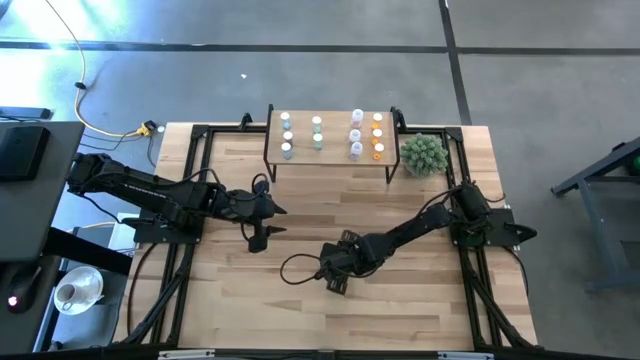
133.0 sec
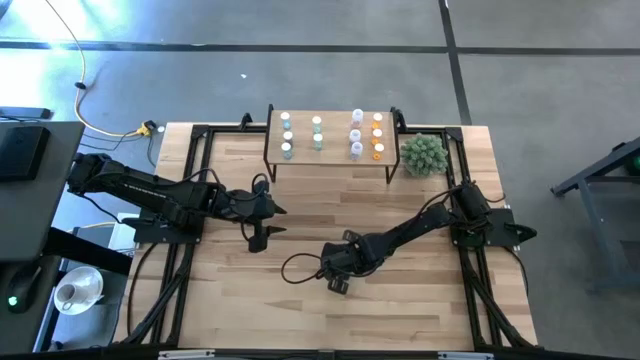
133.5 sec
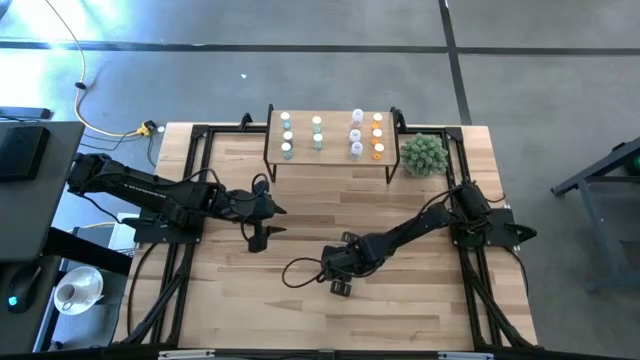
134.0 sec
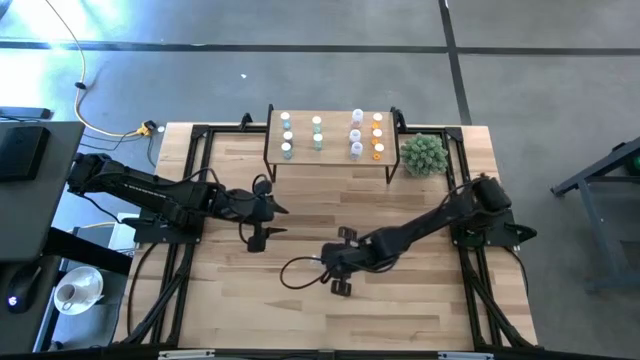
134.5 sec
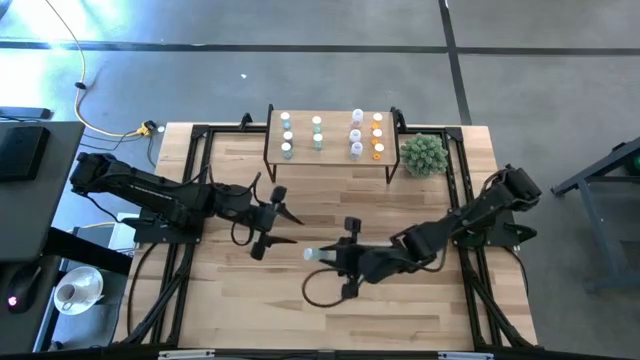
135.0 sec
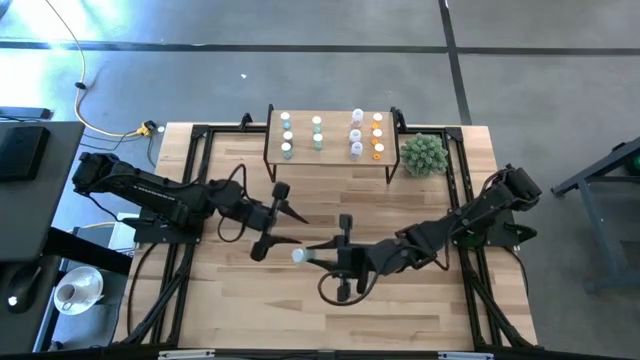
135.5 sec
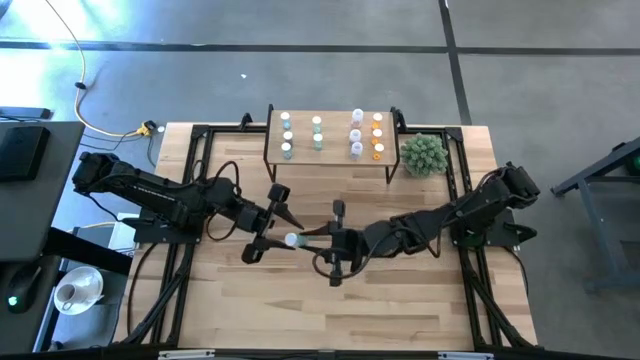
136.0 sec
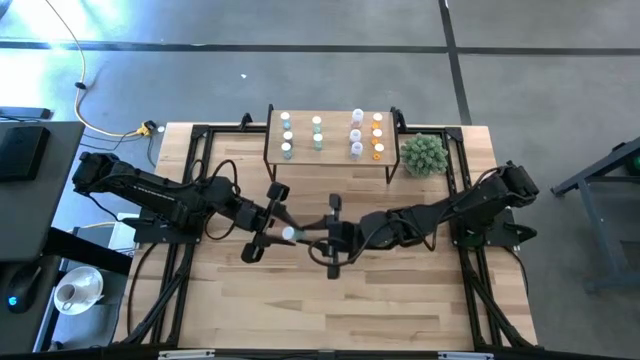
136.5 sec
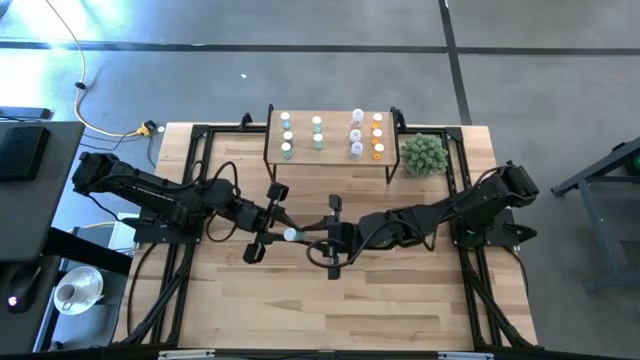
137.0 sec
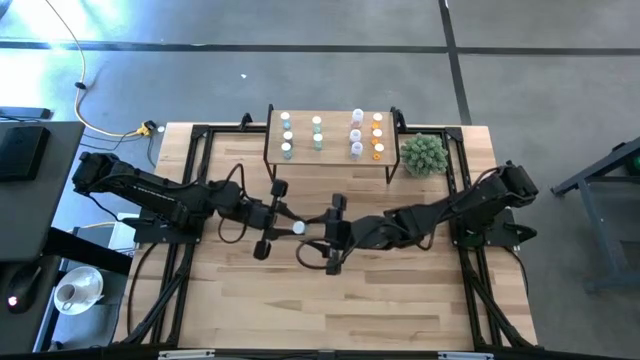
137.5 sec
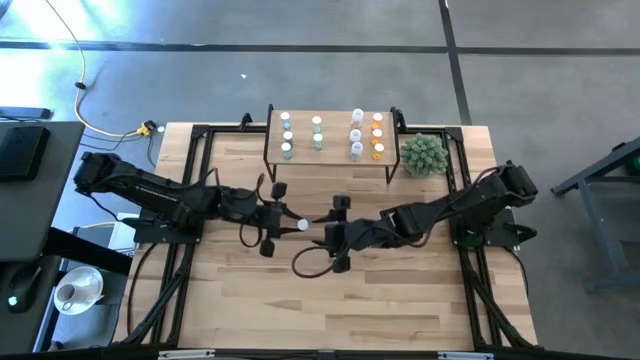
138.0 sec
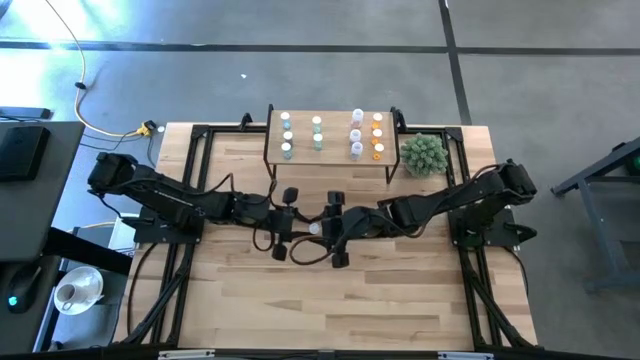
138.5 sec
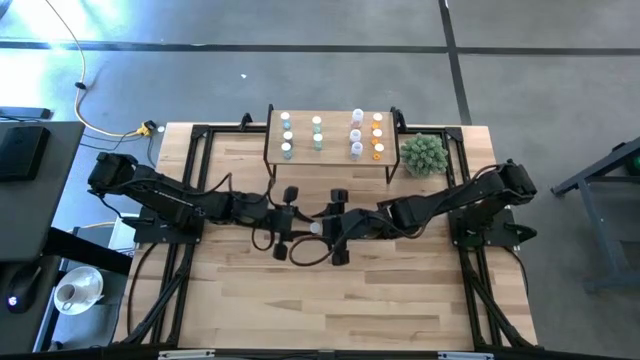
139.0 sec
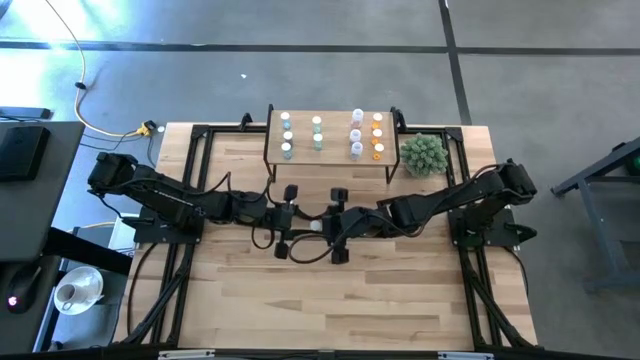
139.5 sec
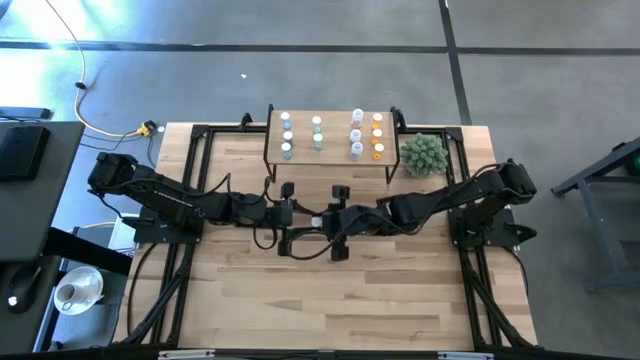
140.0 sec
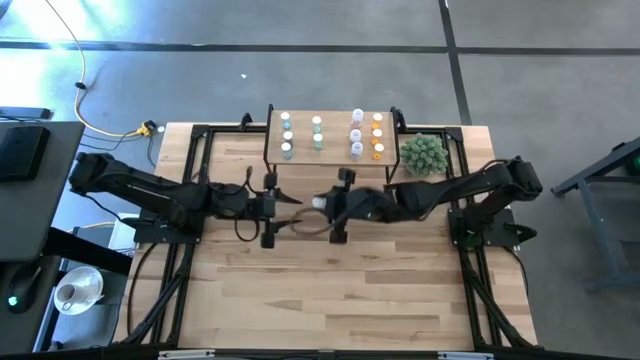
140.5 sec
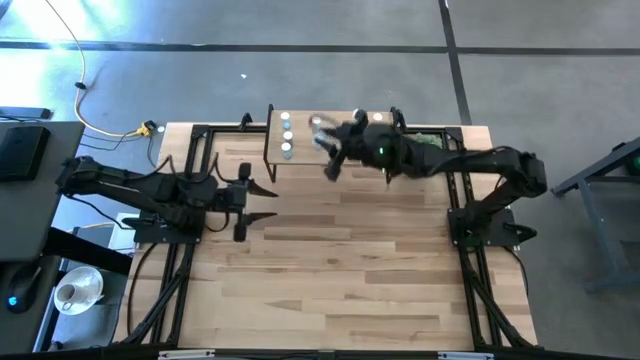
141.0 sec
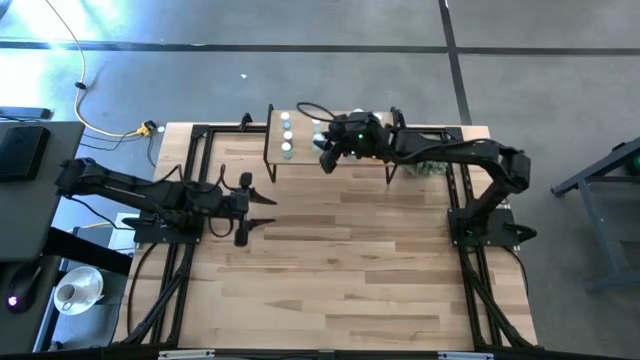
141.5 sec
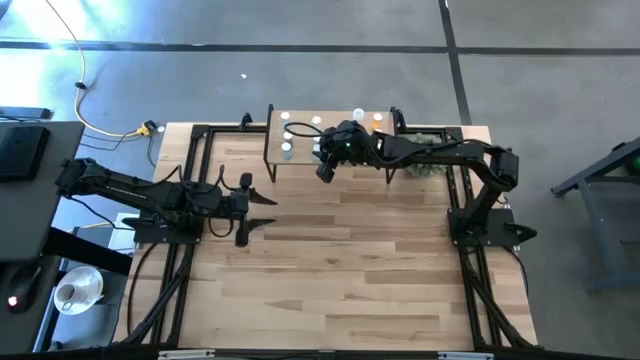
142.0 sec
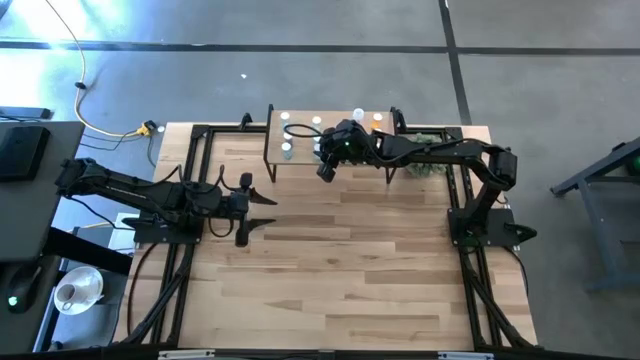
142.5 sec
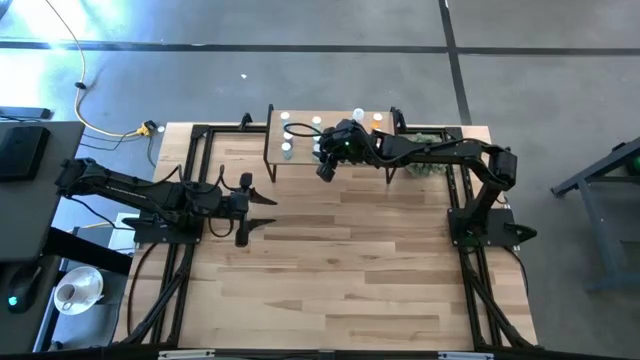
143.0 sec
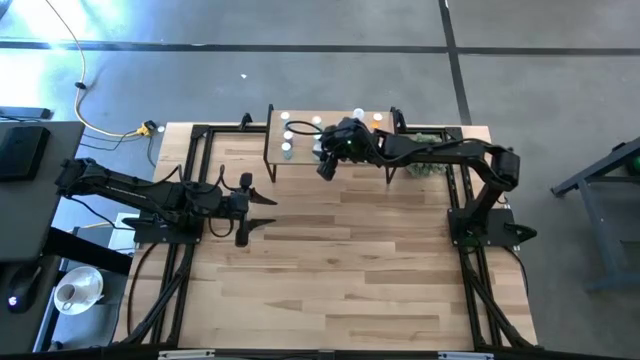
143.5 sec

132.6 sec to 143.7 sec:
Task: Pick and place medicine bottles onto shelf by color
Put the green pill bottle on the shelf aligned with the other green pill bottles

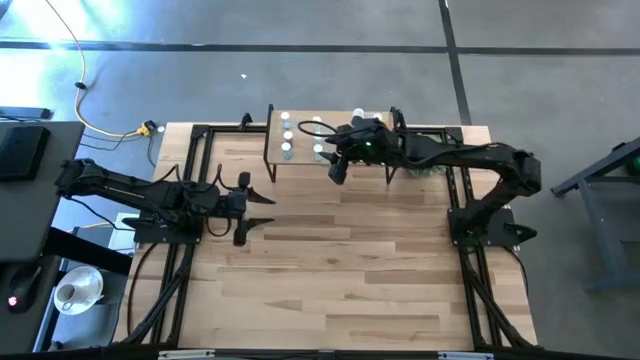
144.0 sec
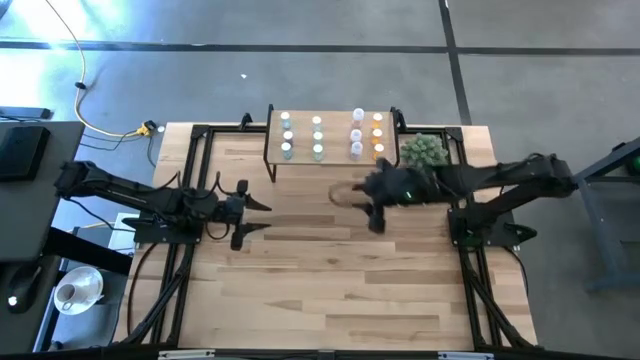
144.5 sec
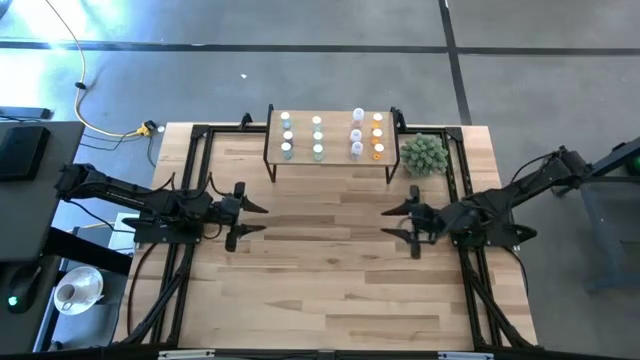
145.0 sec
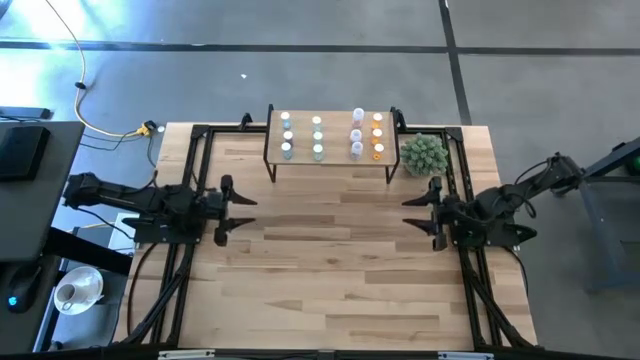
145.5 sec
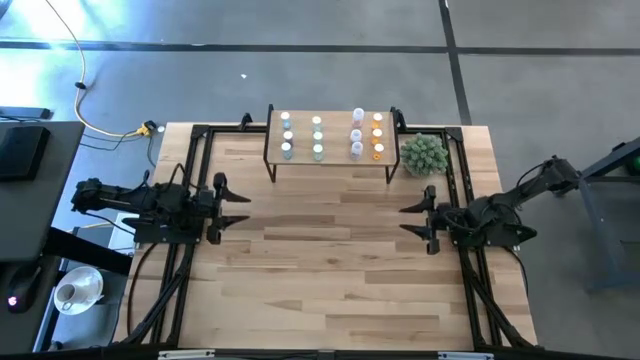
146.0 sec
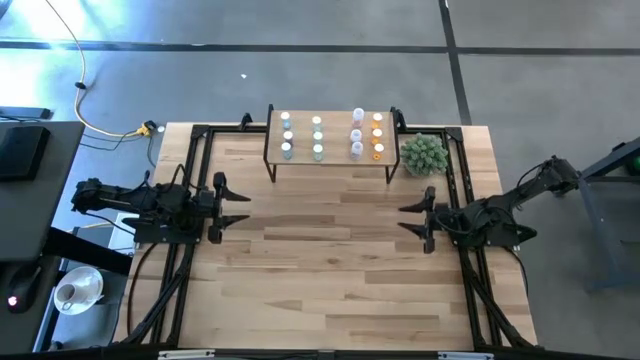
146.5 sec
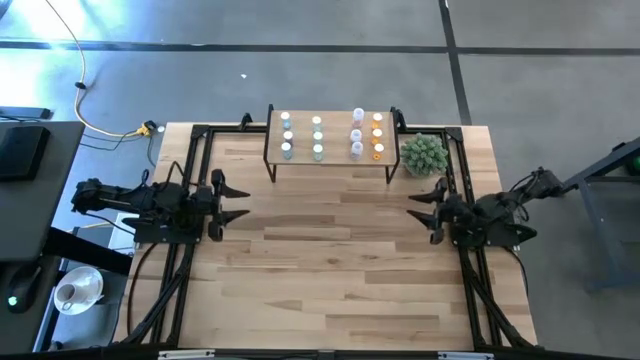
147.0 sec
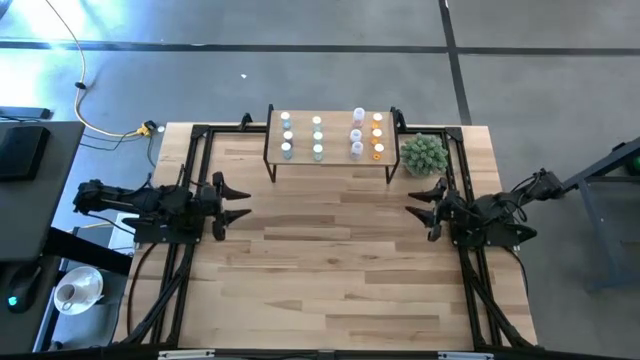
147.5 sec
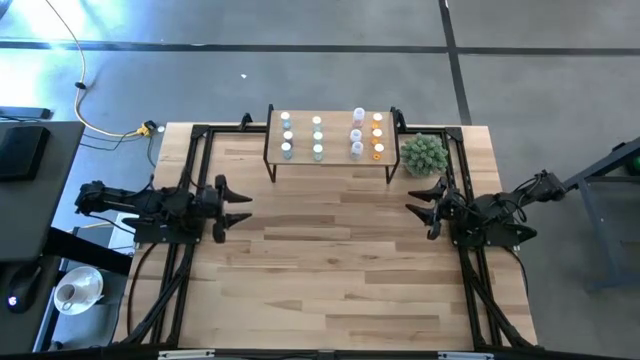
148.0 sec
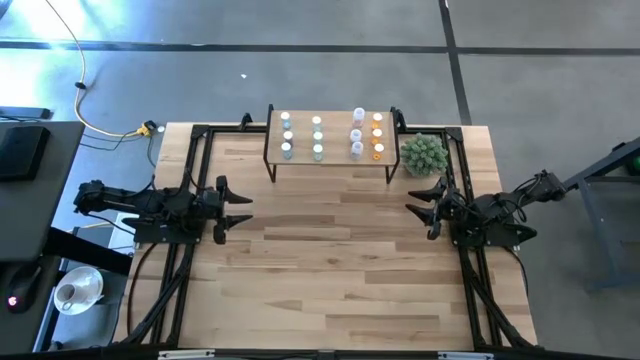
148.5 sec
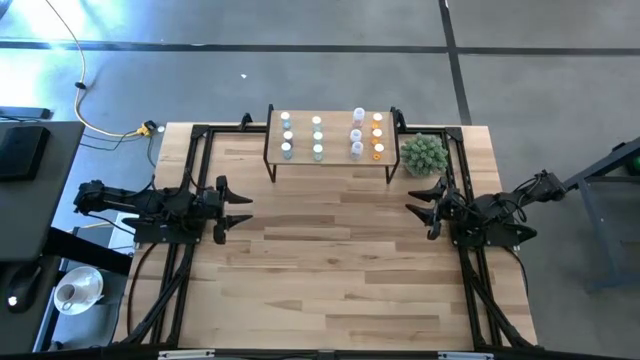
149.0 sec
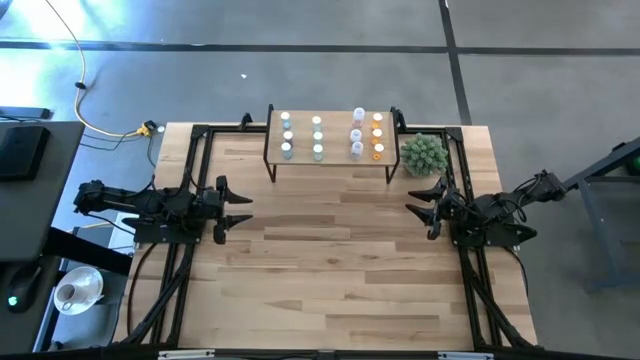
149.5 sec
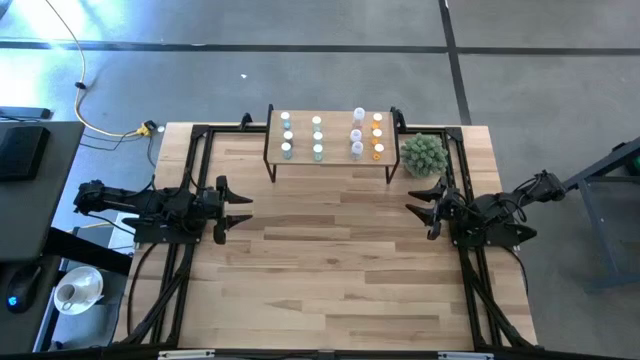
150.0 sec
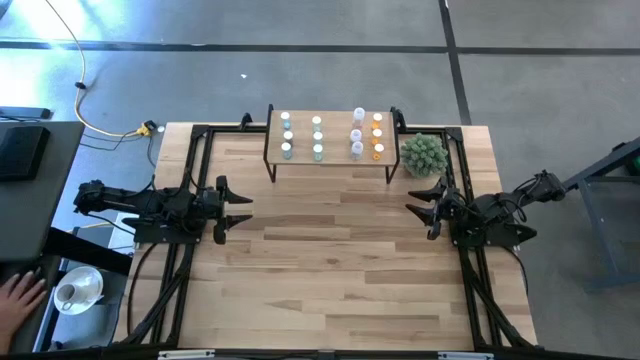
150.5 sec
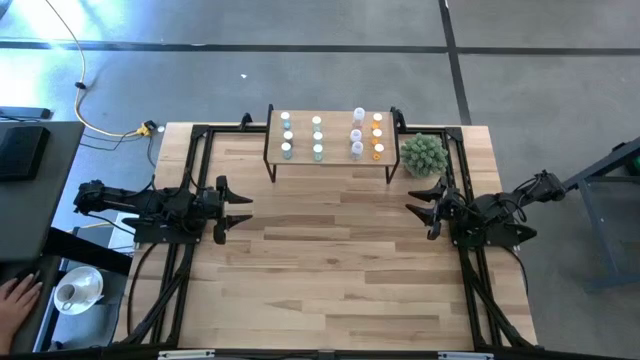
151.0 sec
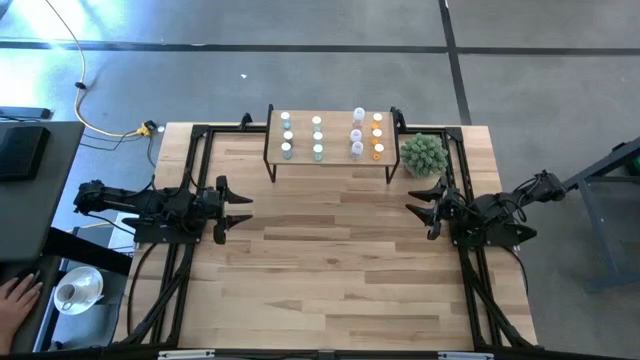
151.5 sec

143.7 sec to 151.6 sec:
Return to Home Position

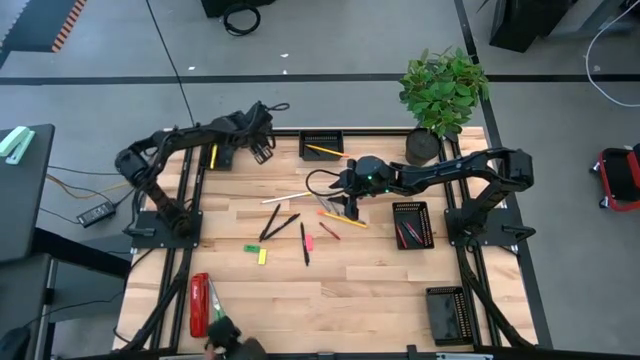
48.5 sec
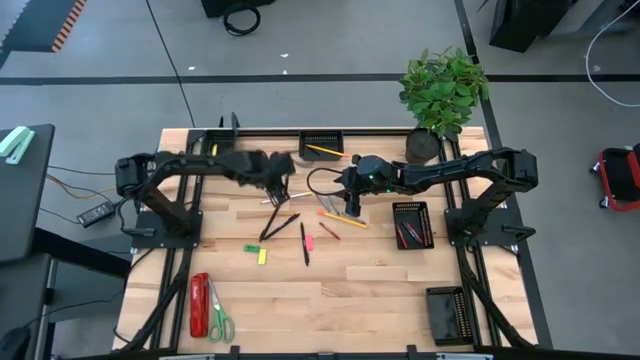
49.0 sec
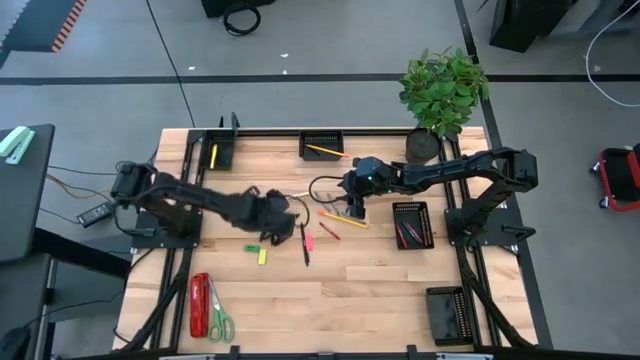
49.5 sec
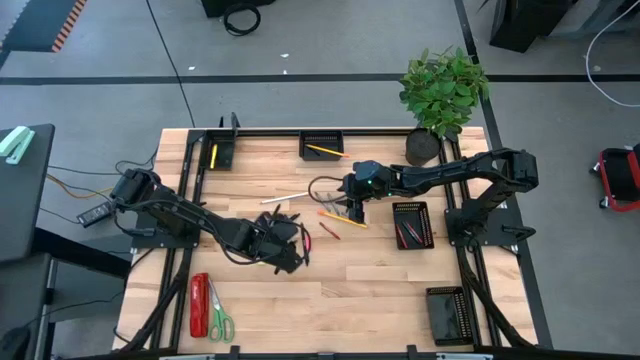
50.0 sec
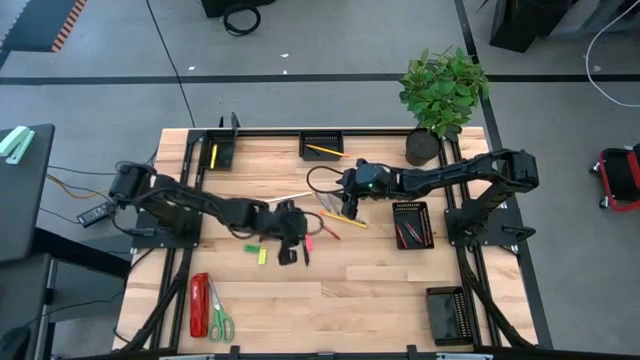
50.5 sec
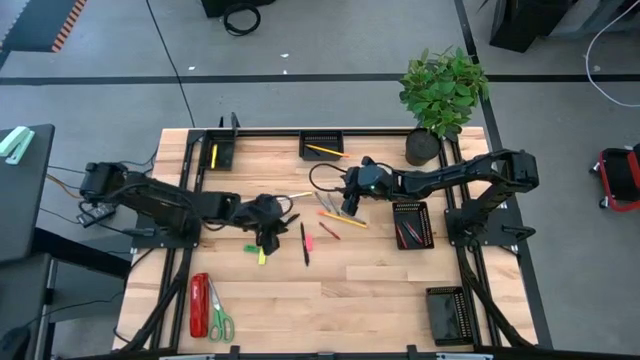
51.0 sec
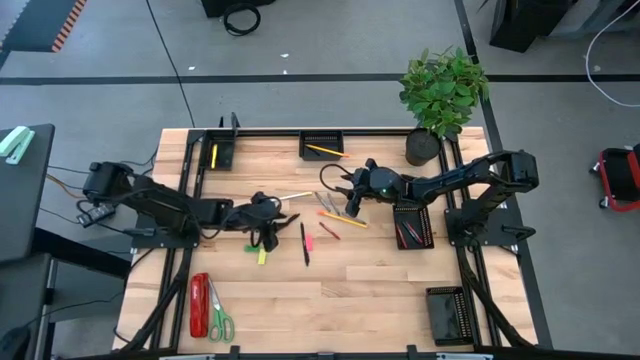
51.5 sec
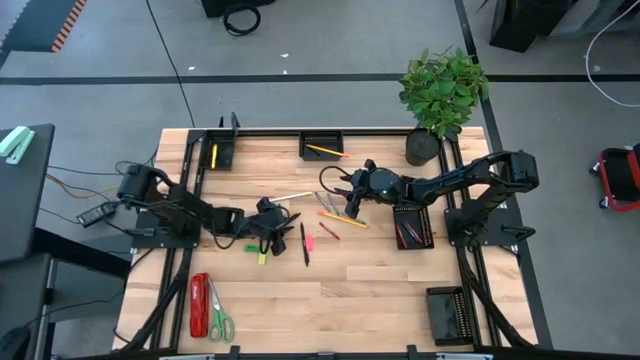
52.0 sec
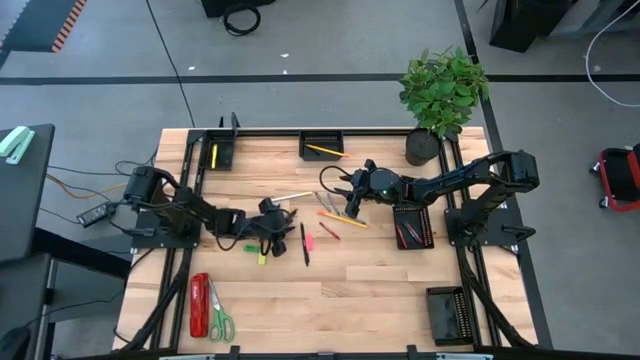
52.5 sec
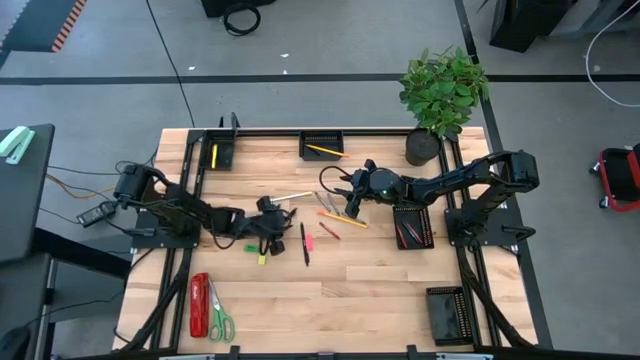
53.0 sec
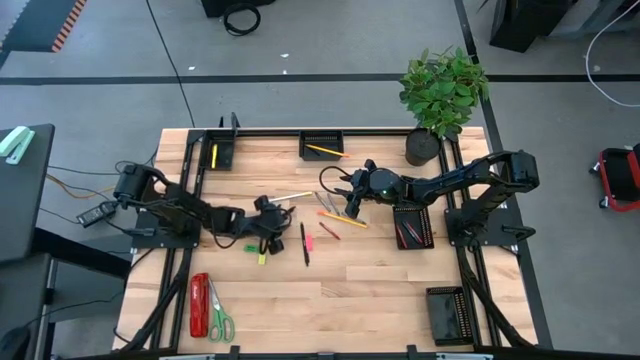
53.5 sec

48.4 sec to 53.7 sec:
Task: Sort crayons/erasers/pens/pencils in bins
Put the black pen into the top left black bin
